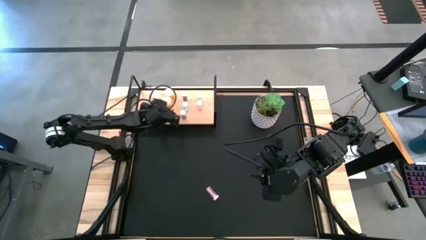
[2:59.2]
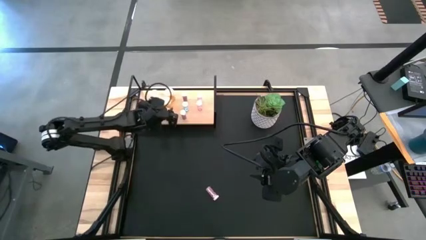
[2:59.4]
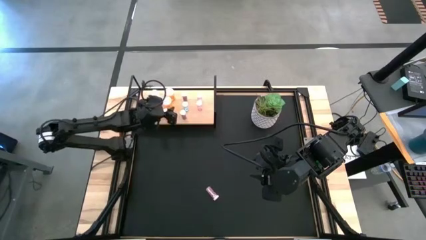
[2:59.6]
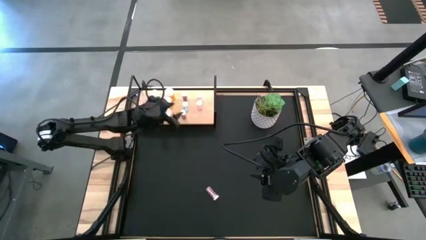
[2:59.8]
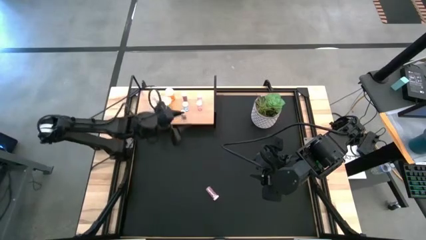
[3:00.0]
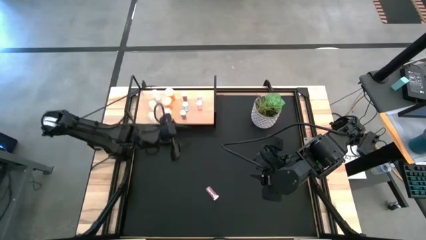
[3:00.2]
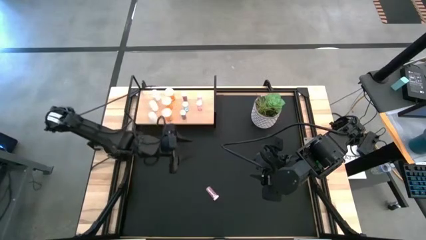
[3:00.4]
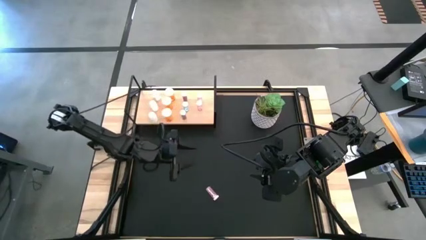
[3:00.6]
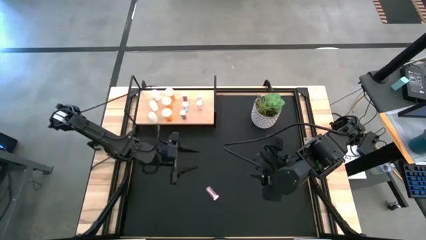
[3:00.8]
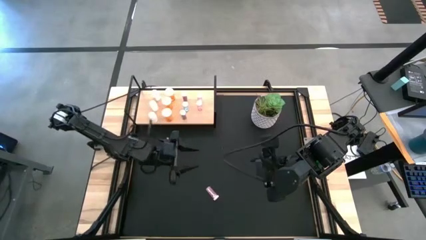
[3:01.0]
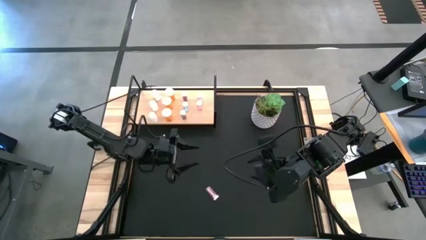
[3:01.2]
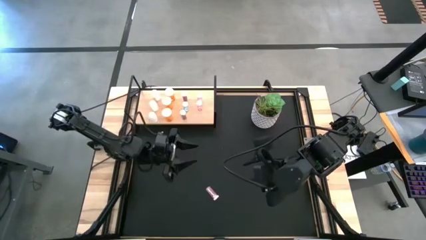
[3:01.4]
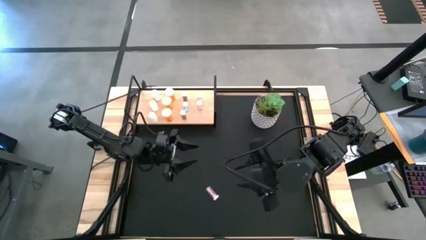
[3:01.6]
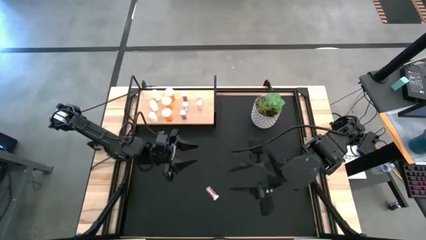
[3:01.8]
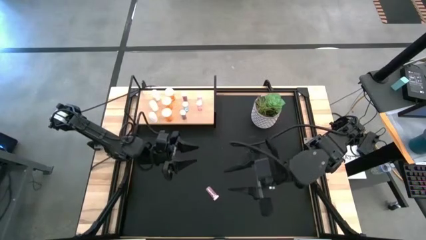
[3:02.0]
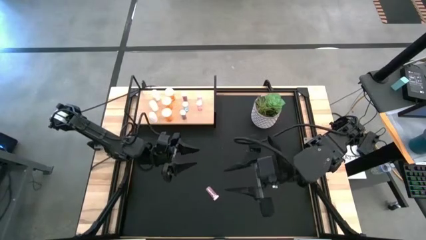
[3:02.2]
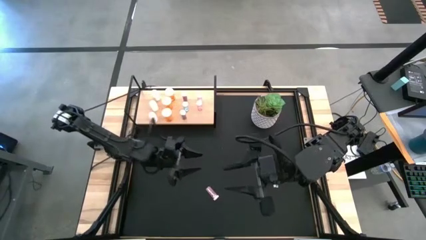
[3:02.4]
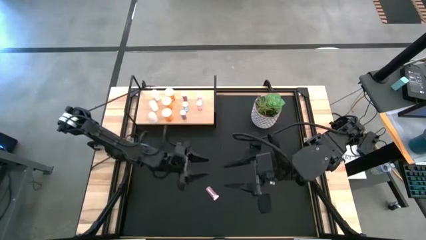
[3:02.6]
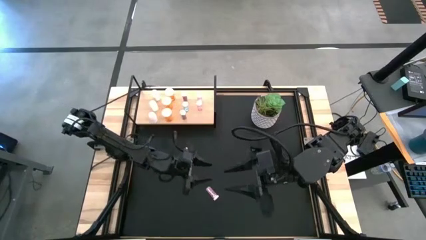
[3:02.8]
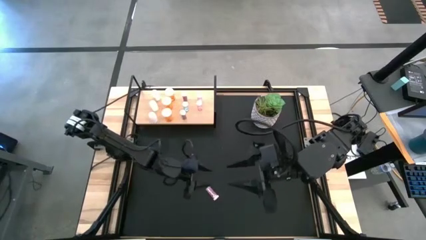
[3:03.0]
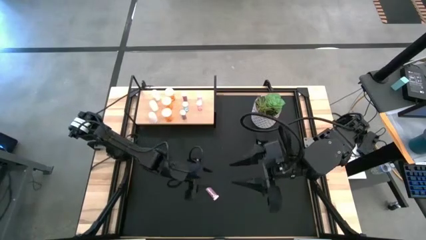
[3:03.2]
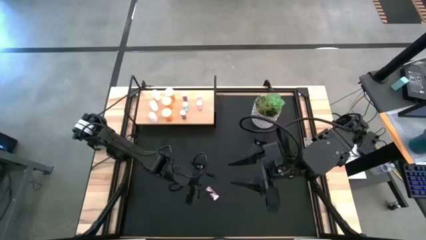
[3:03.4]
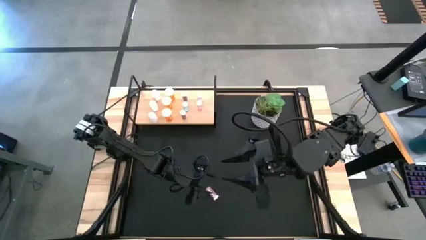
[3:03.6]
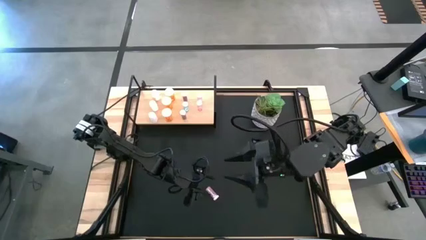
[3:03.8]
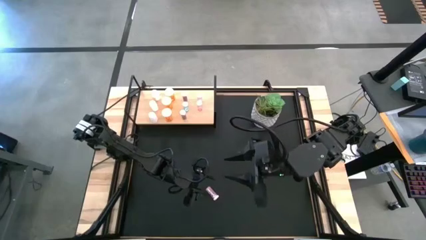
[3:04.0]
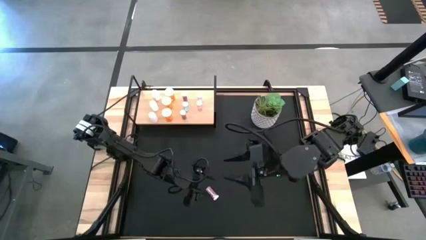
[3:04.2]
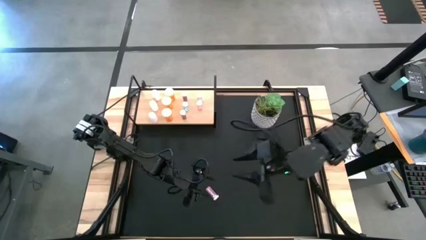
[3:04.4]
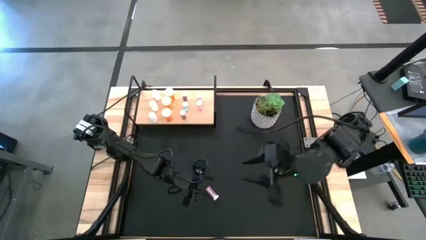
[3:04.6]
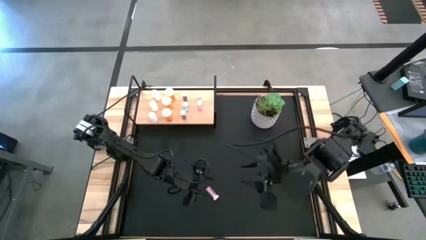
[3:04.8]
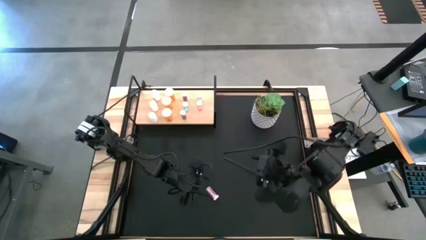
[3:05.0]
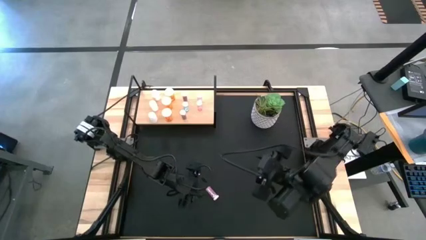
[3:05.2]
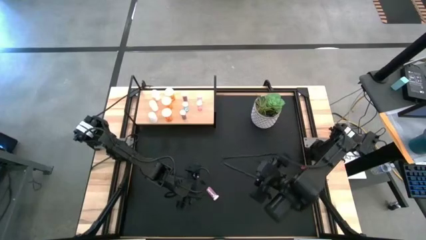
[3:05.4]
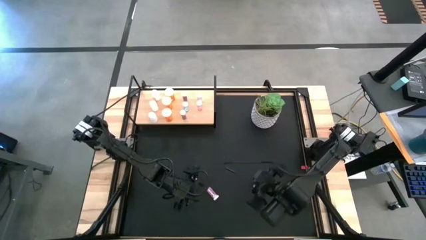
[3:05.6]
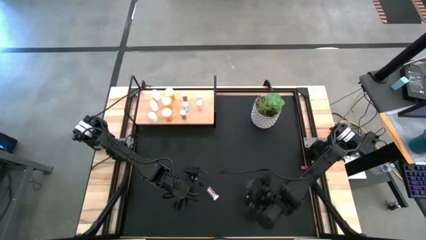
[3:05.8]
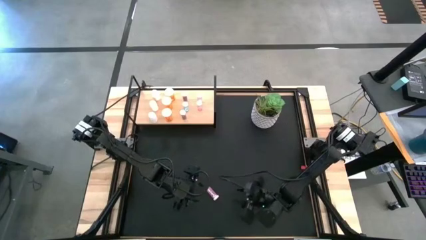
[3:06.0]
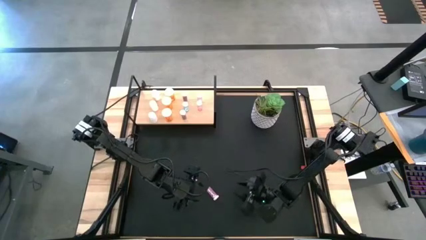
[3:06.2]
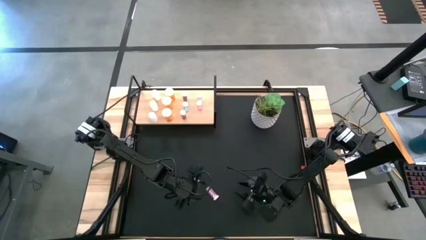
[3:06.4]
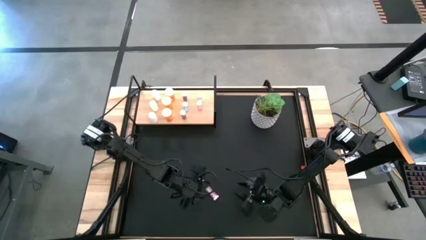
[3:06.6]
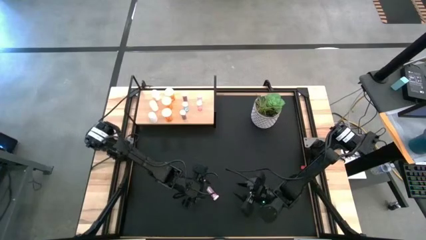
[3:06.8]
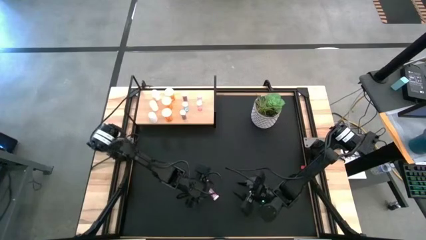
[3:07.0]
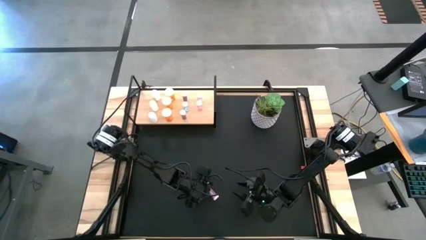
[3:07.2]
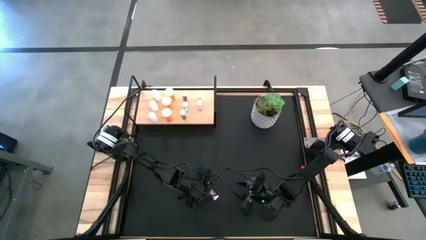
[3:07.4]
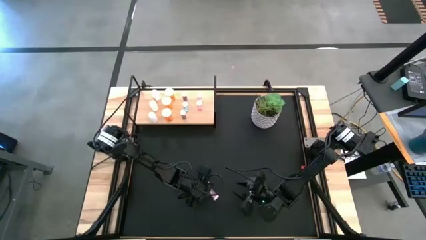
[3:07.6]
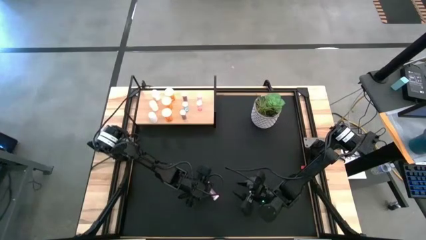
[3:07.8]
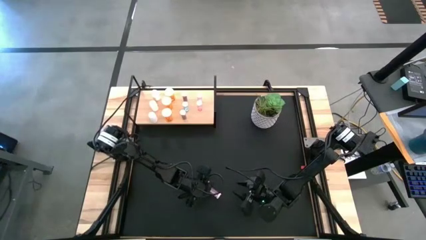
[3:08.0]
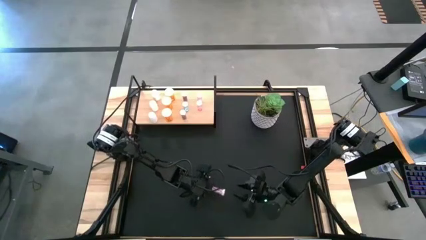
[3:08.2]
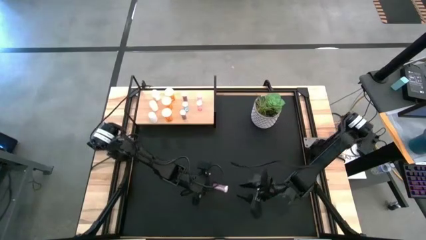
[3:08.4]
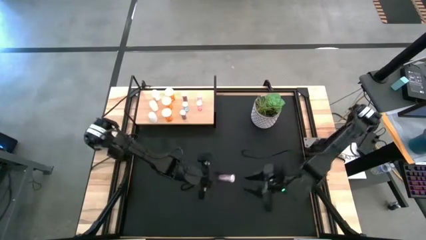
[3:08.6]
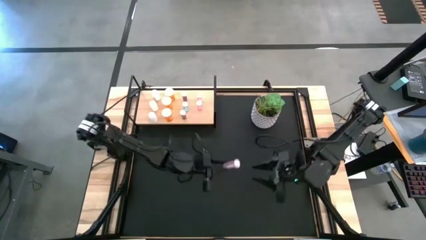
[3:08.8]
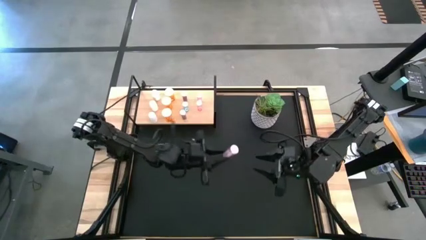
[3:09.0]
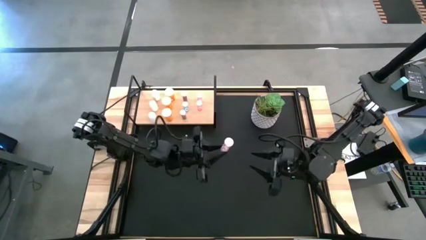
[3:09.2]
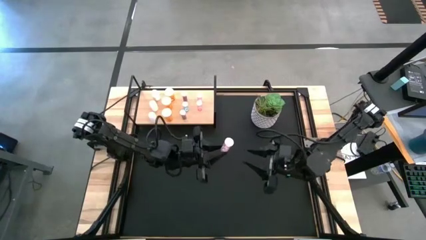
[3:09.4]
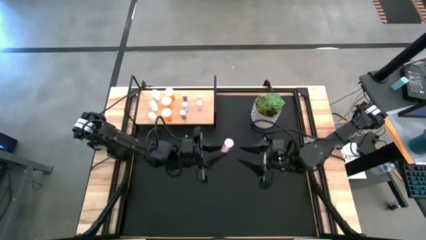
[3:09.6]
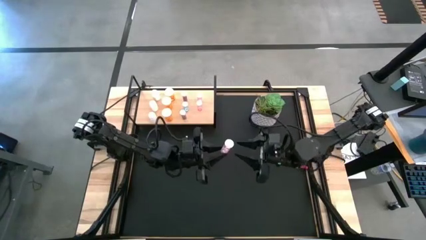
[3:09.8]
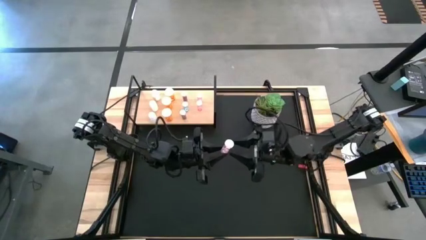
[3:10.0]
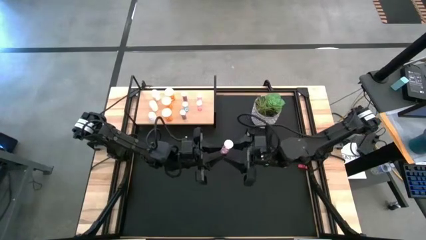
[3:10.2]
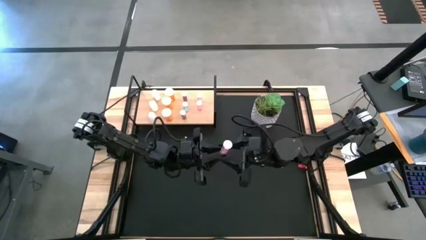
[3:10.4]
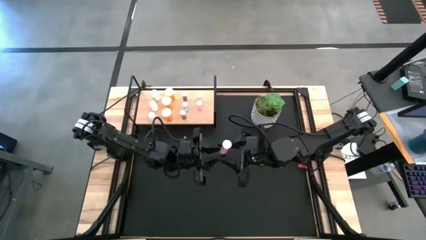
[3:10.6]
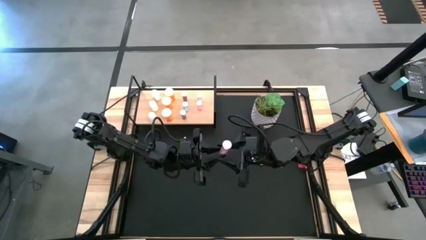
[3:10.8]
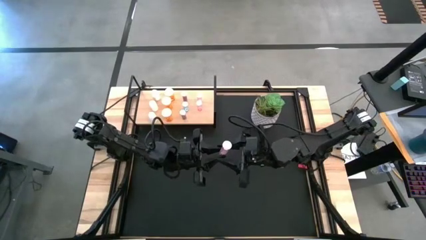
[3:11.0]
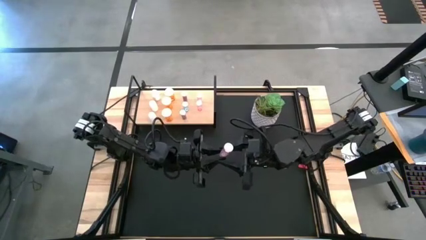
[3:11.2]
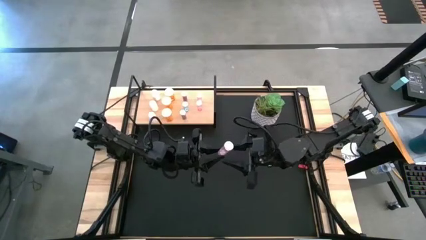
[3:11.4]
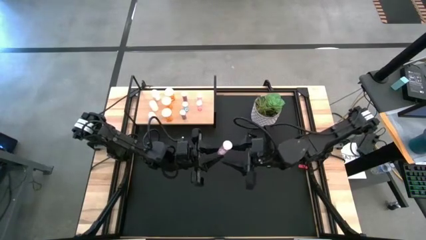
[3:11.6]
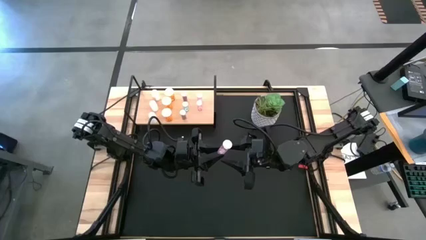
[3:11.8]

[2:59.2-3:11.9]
Task: Pick and place medicine bottles onto shelf by color
Put the pink pill bottle on the shelf aligned with the other pink pill bottles

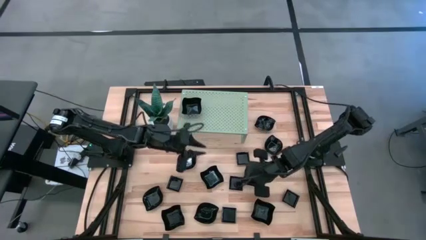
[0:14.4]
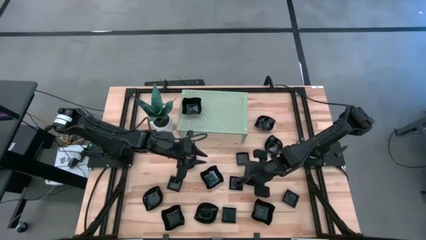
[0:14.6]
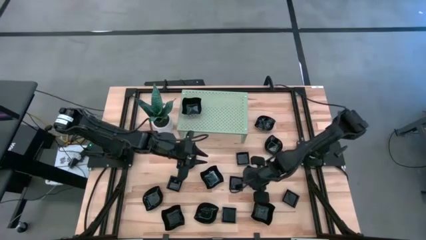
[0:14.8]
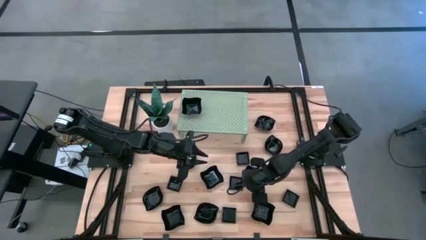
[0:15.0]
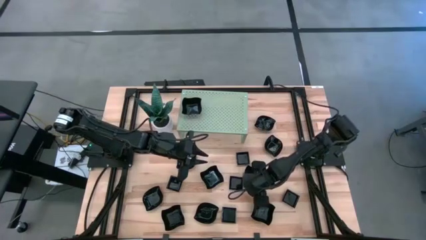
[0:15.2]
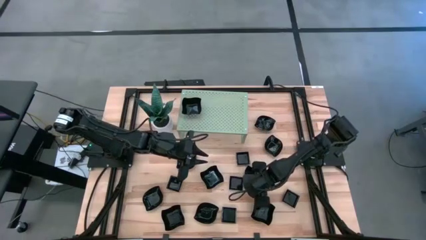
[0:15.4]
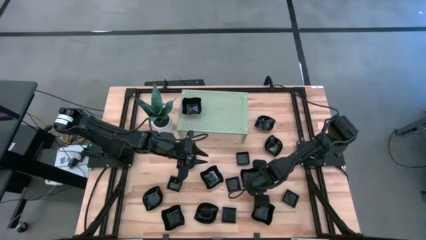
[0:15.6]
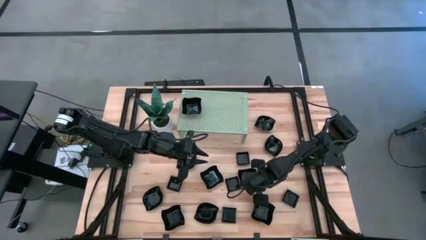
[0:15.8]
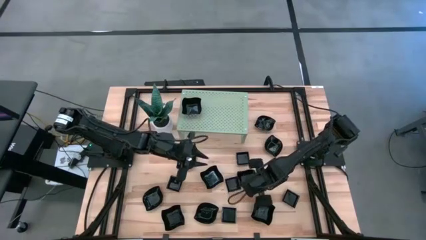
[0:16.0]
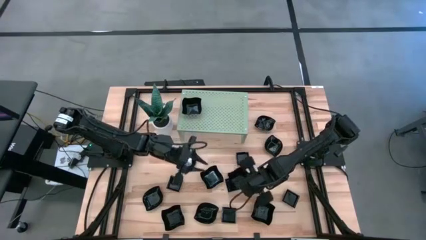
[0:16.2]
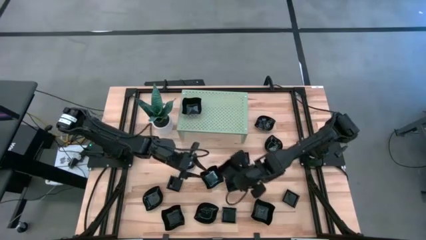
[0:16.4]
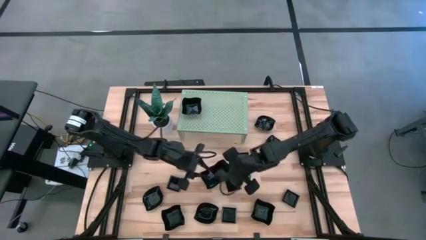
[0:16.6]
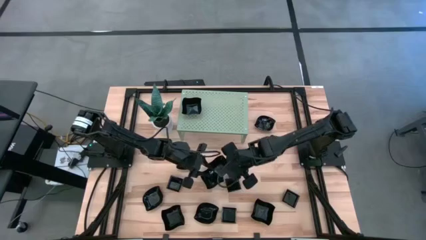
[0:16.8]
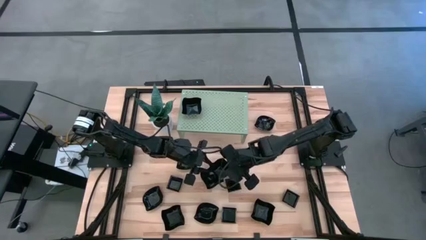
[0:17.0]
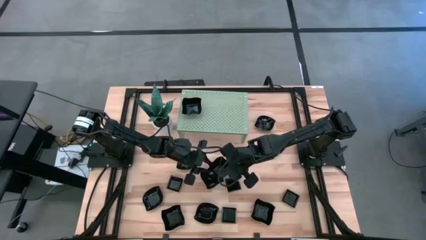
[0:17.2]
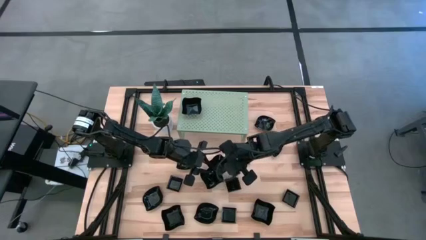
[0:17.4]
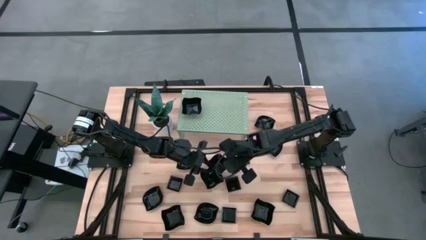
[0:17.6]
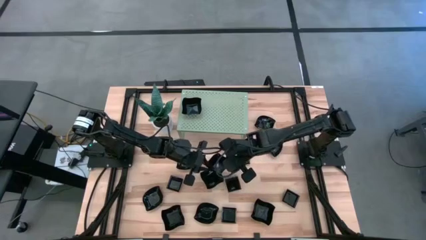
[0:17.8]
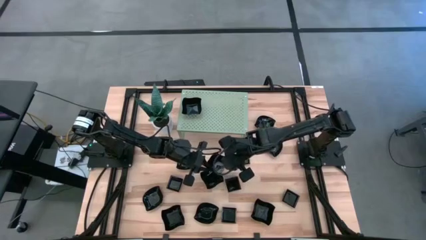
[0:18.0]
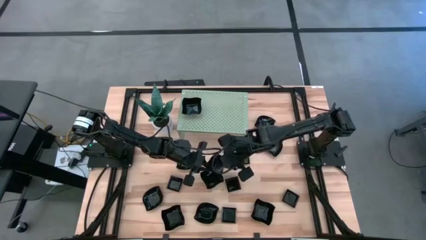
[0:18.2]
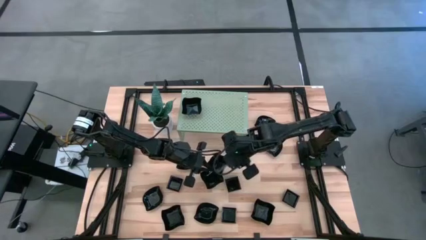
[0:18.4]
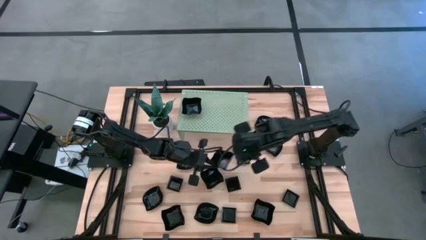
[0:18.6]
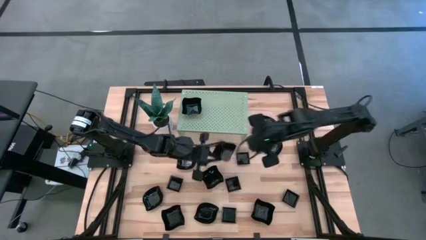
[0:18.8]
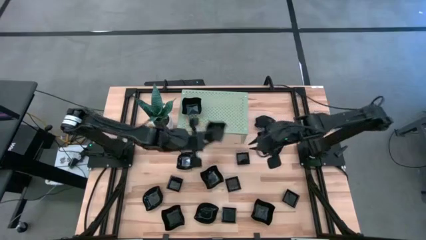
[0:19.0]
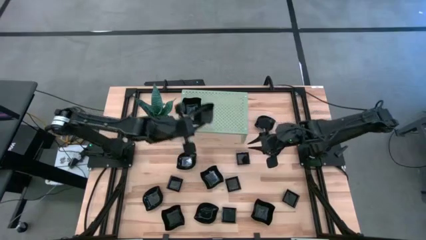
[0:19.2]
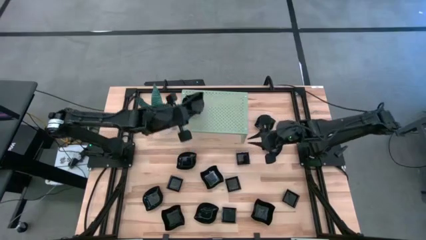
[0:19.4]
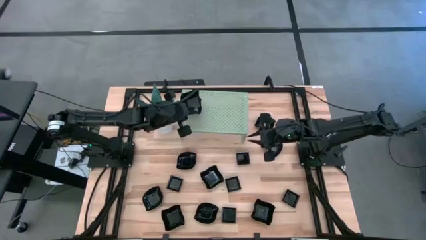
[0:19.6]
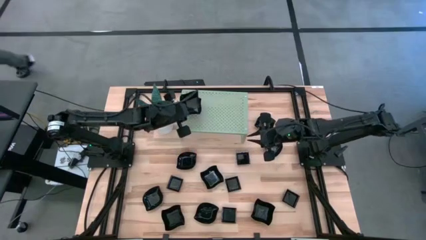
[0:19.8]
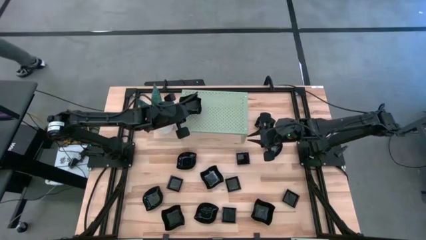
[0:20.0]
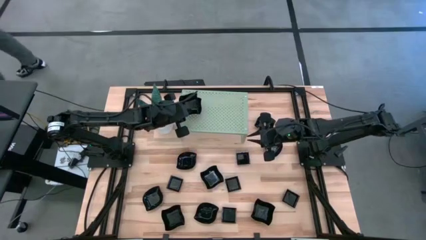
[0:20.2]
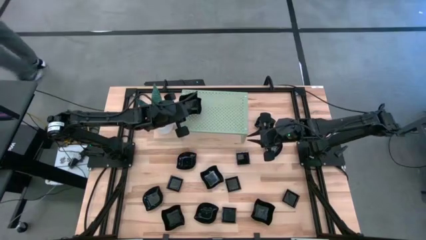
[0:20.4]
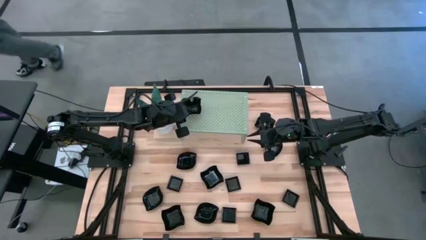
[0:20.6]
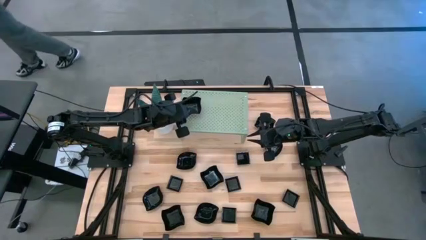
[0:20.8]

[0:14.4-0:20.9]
Task: Pick & Place Mini shaped plates
Stack the distorted square plate on top of the other distorted square plate on the shelf
